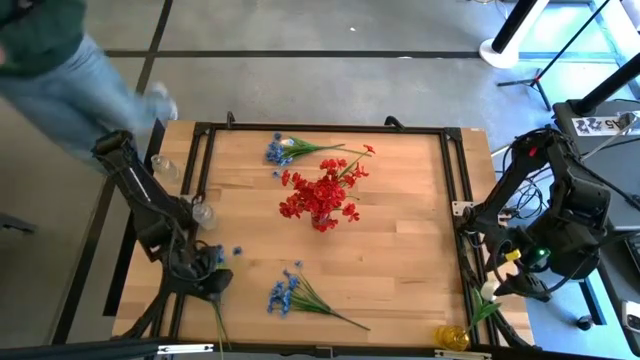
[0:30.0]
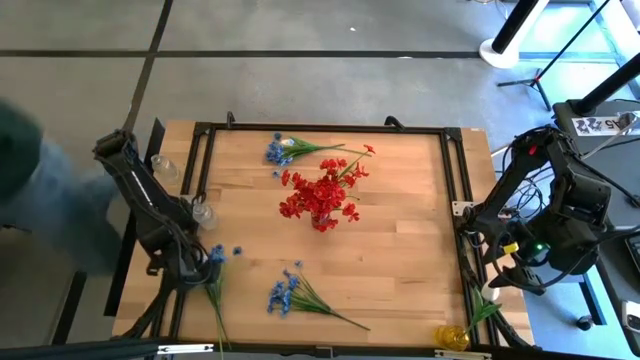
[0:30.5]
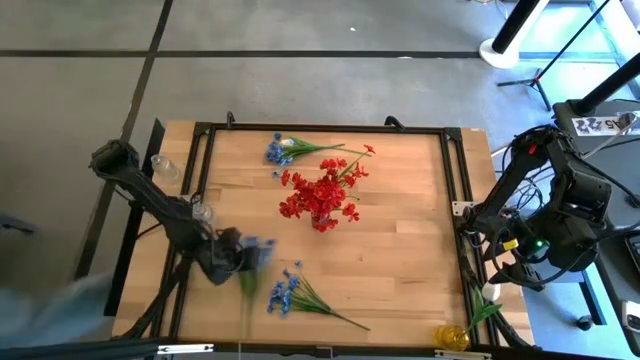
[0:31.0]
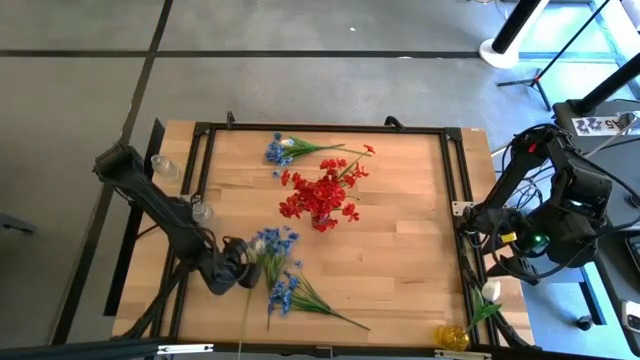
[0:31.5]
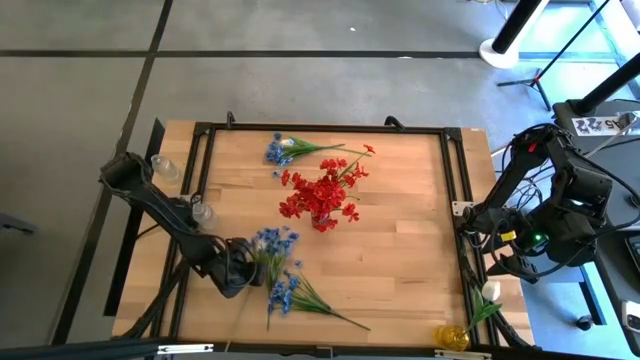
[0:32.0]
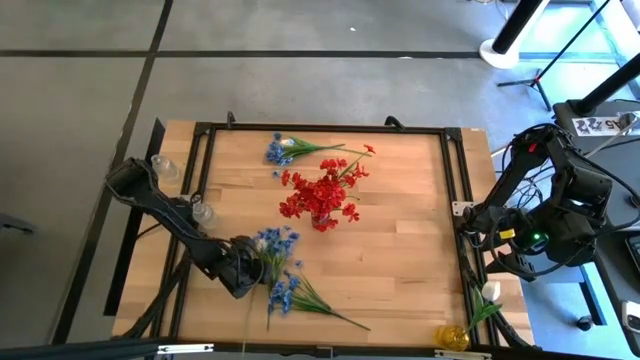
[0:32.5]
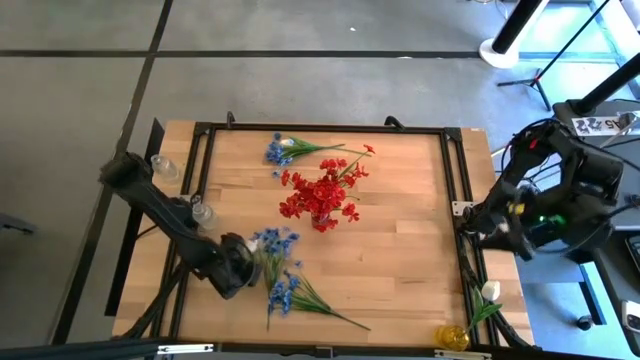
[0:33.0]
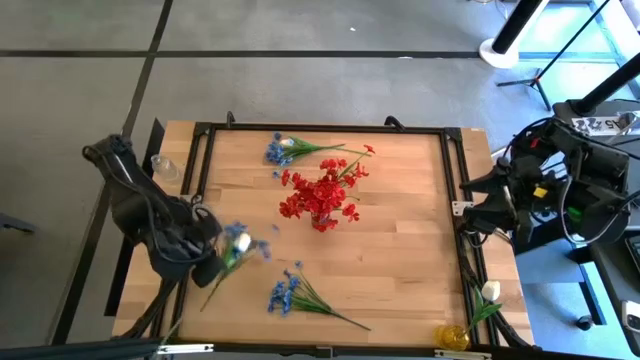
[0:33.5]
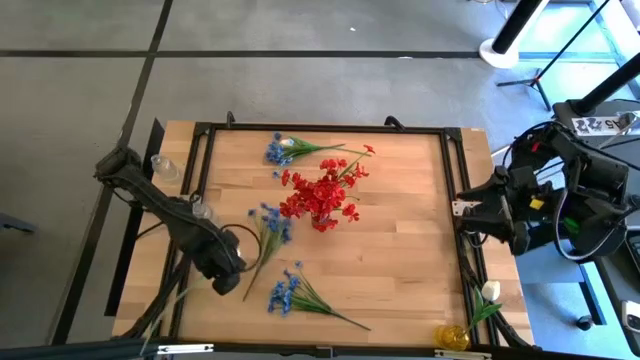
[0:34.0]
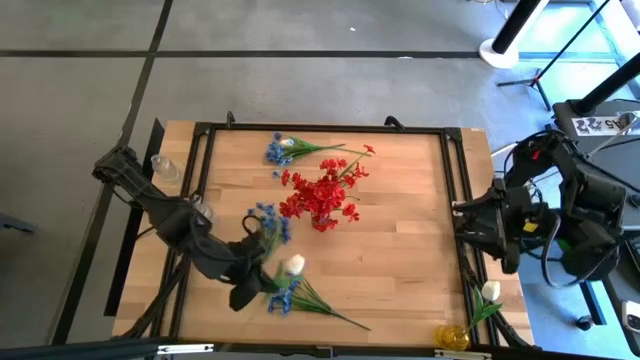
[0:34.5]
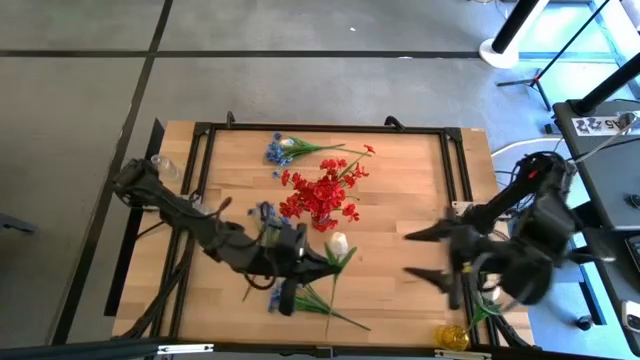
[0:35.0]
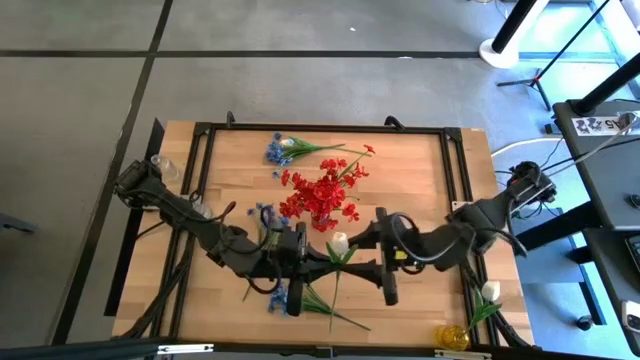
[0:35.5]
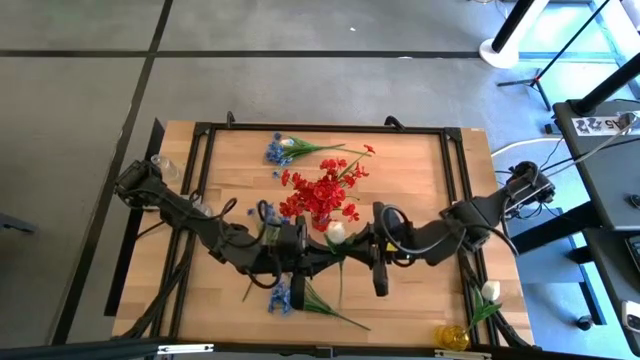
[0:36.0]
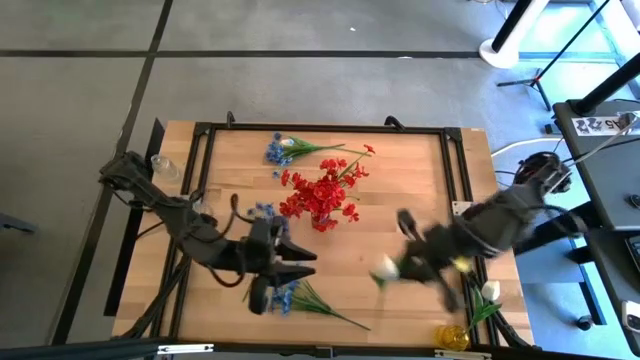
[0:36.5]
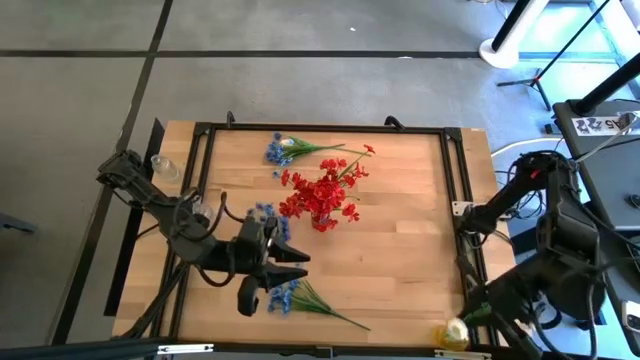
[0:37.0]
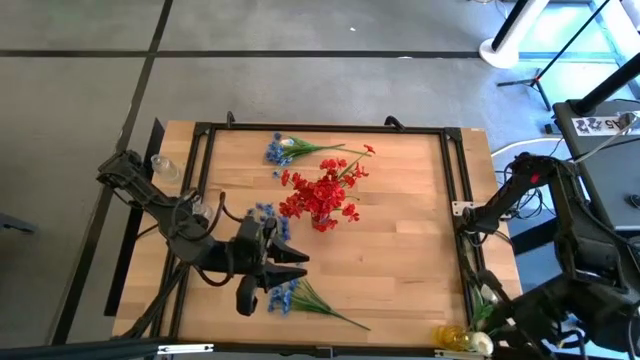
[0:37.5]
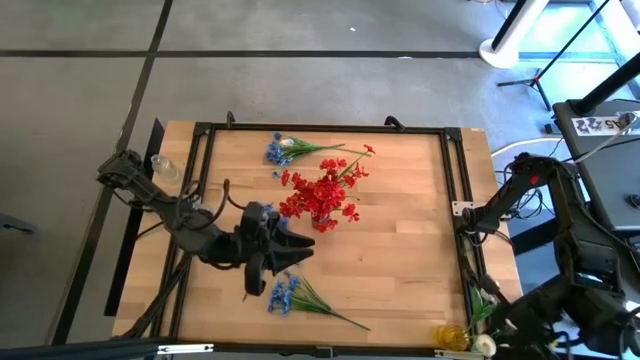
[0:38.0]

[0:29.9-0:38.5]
Task: Sort flowers into vase by color
Put the bottom white flower into the yellow vase

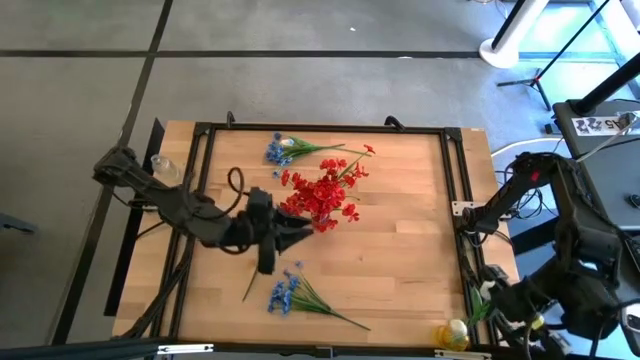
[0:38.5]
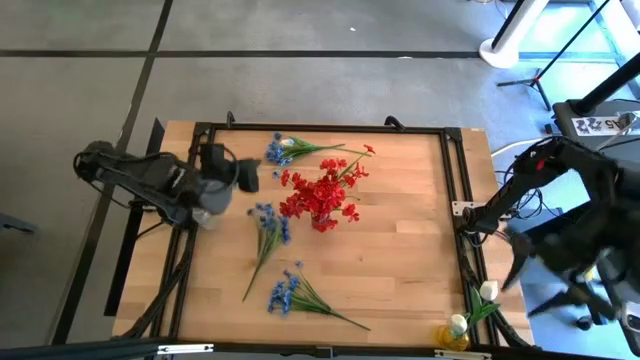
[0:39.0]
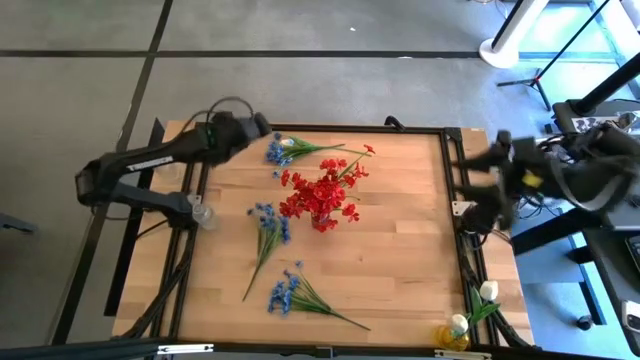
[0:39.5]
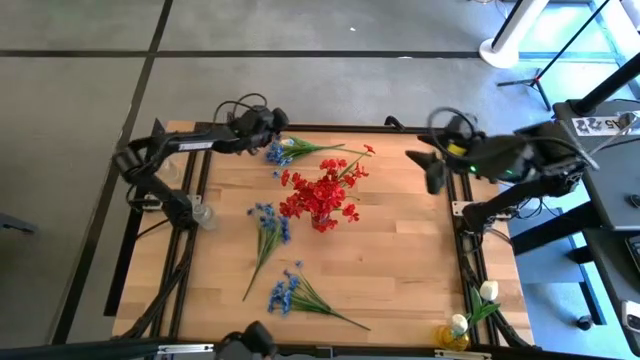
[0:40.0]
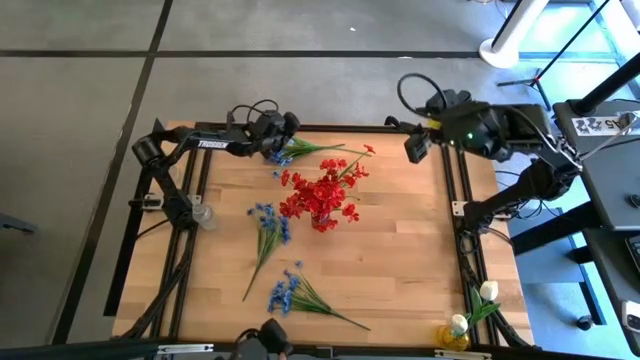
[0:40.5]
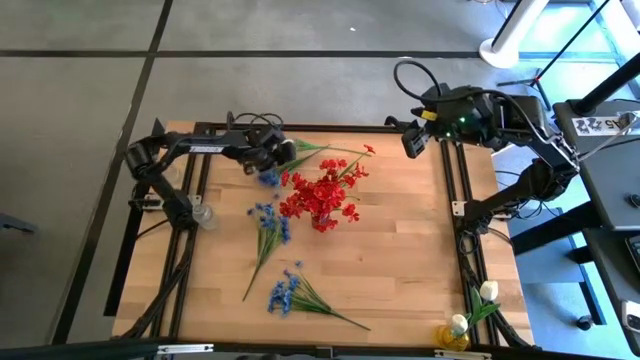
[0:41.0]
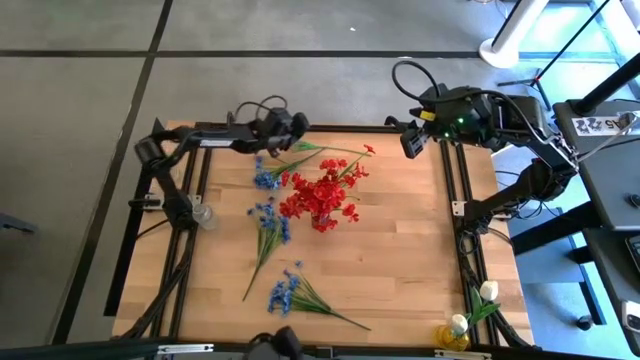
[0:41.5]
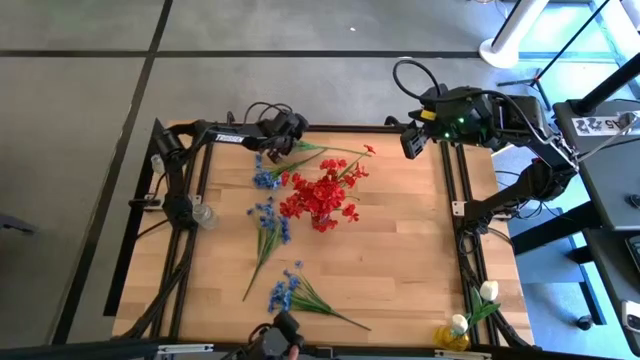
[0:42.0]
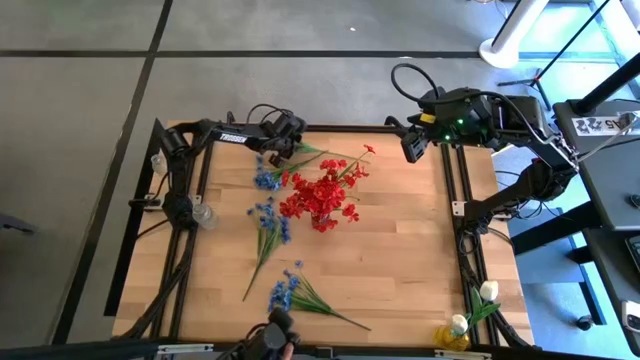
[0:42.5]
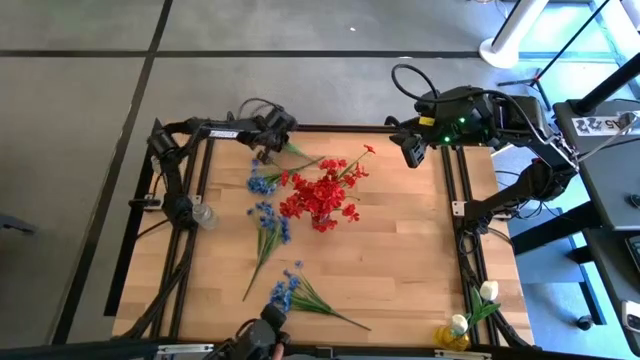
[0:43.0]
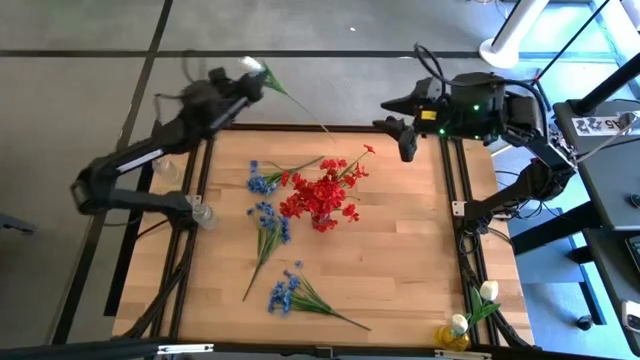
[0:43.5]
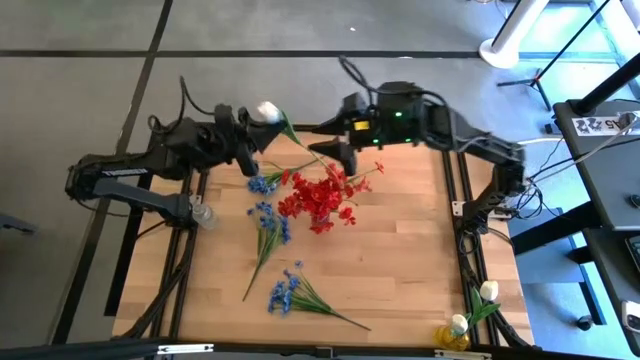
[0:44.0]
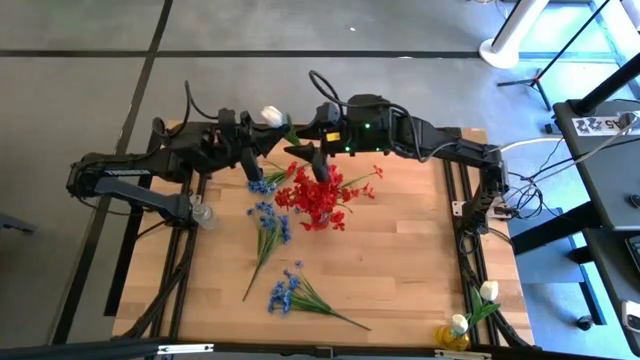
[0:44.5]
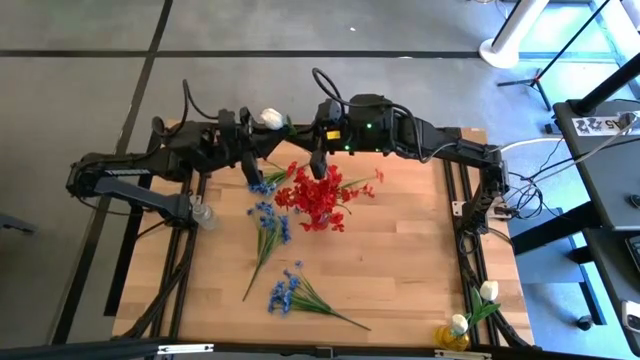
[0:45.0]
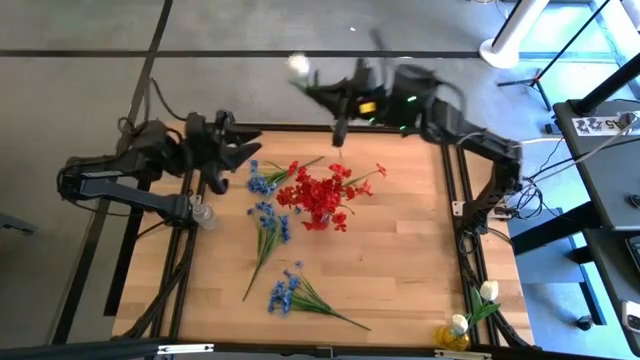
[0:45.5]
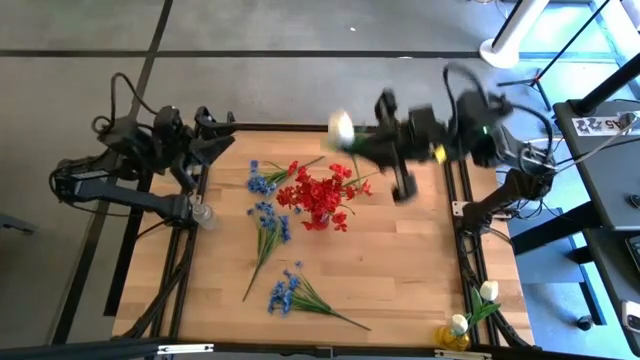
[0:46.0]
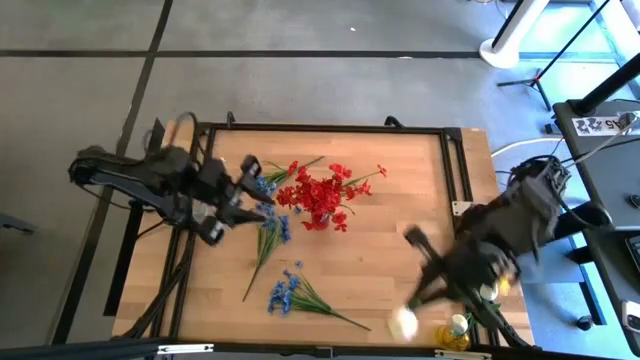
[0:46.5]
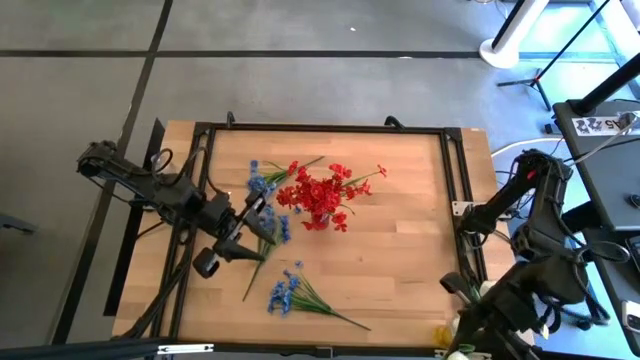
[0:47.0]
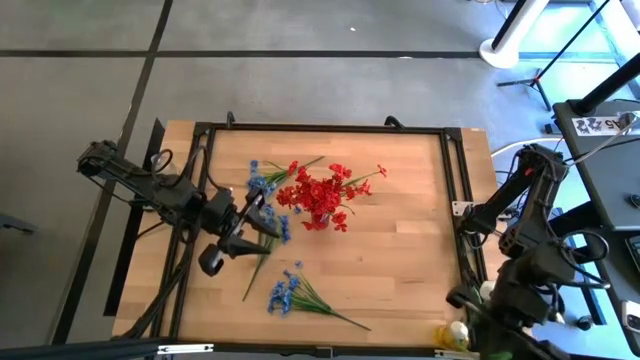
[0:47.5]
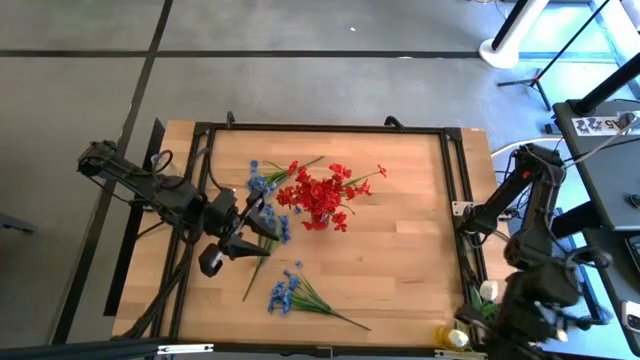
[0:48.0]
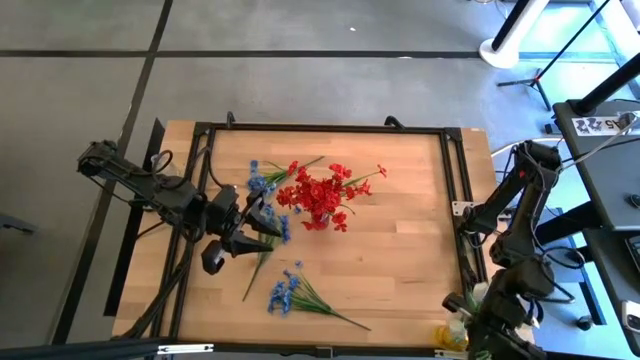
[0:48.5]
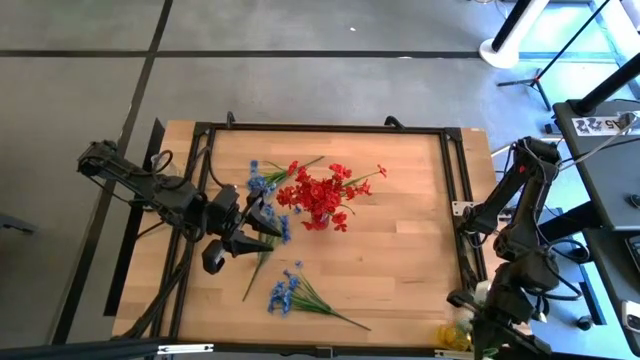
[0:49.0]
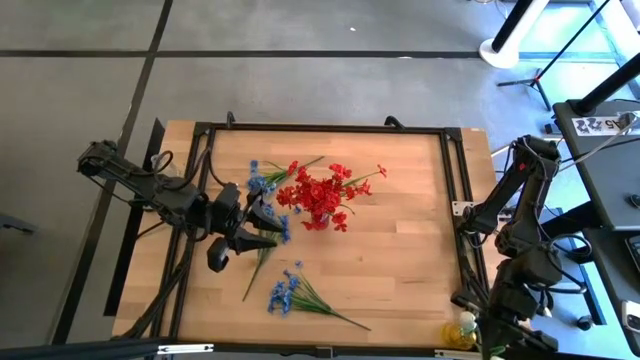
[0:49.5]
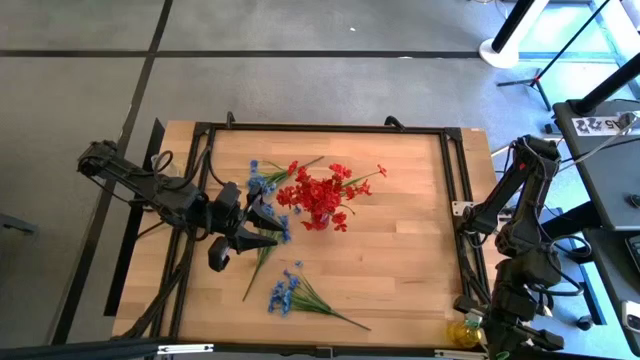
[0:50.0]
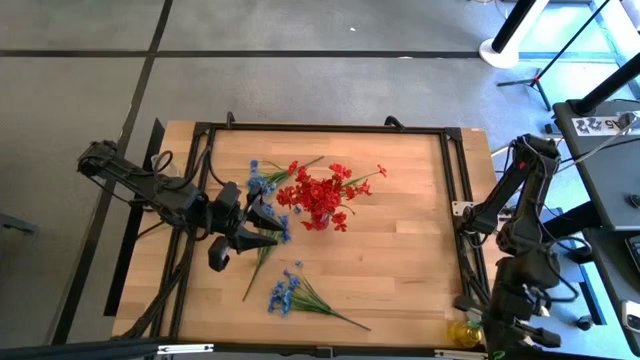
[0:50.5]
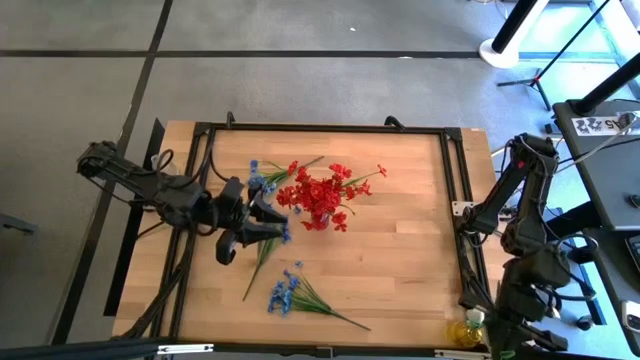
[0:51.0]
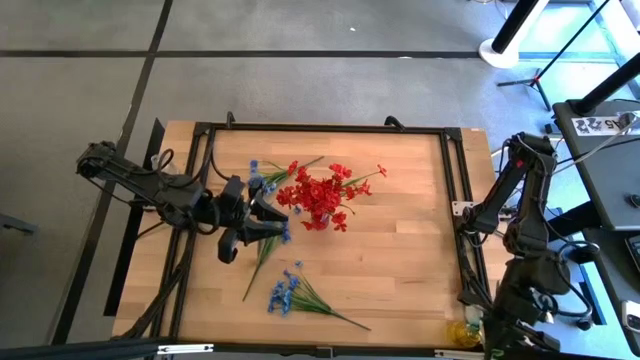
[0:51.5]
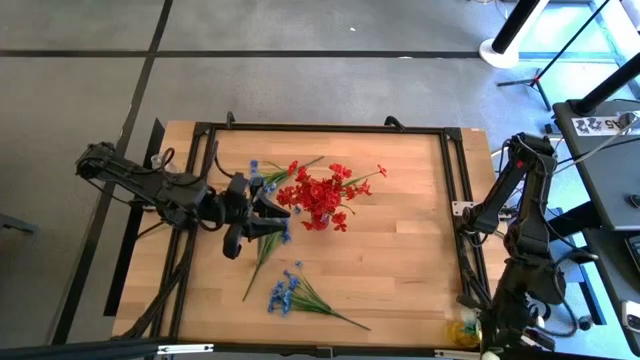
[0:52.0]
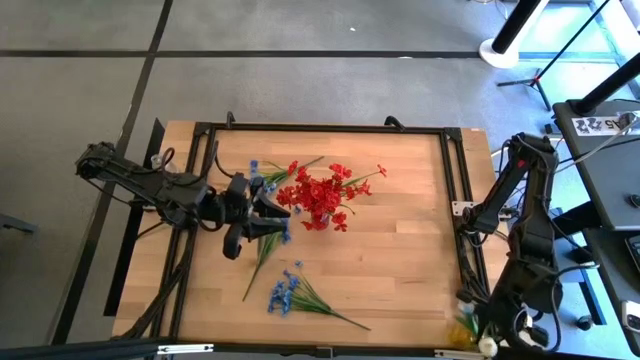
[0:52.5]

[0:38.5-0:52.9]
Put the white flower into the yellow vase
